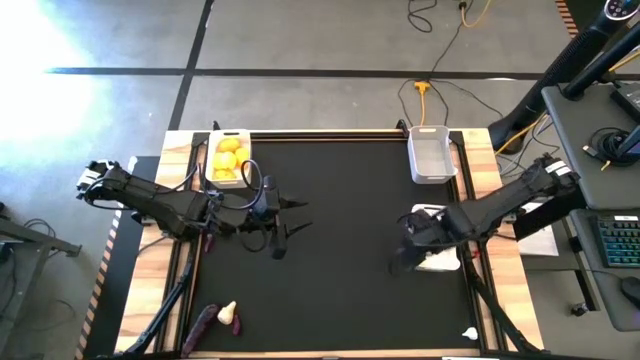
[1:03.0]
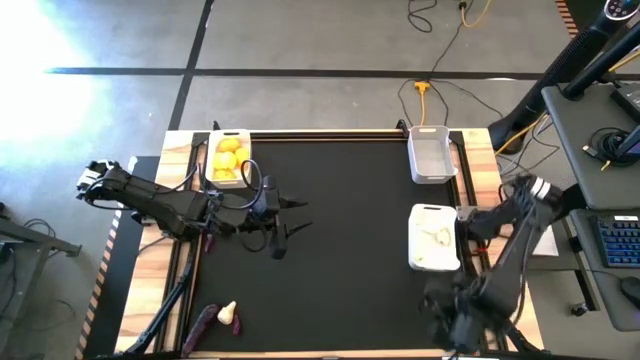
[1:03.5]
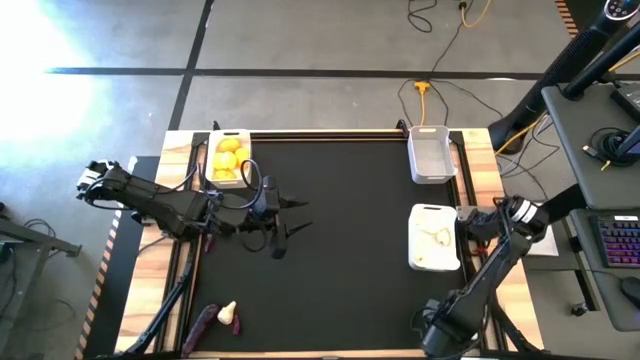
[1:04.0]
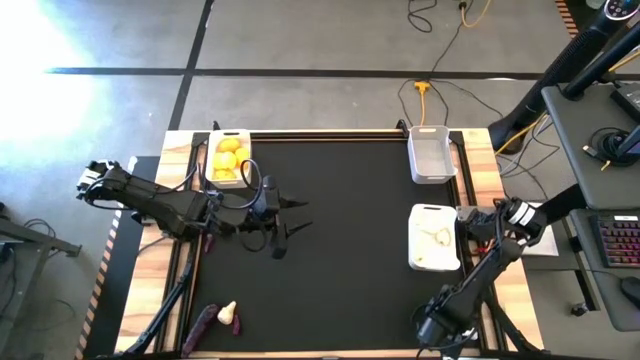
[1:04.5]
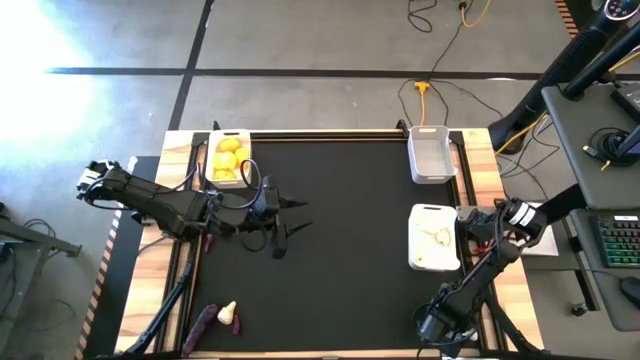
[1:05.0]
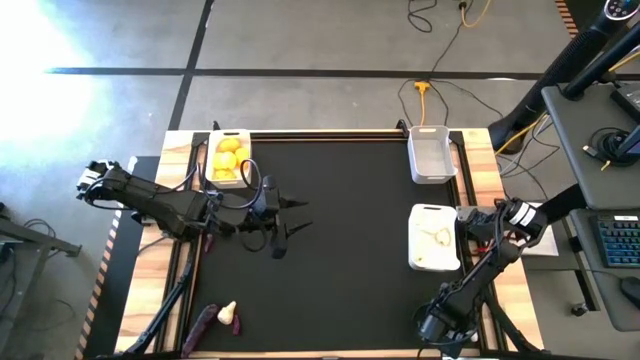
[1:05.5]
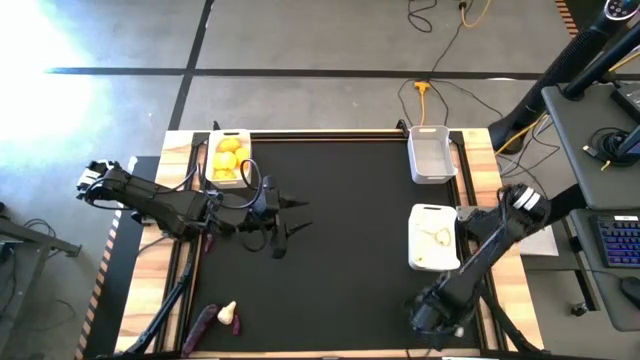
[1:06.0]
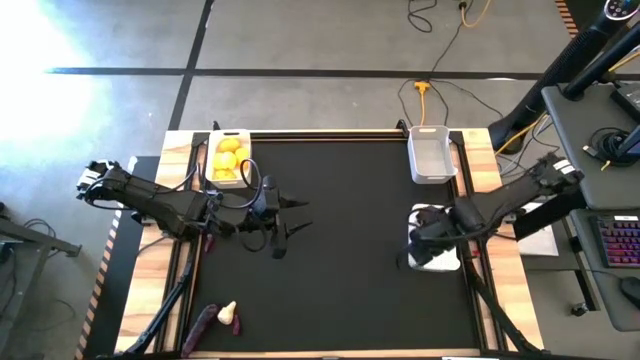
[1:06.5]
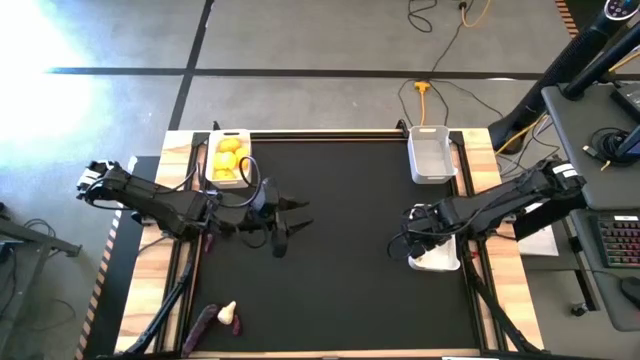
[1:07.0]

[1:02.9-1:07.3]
Task: Sort produce into baskets
Put the white garlic into the right white bin

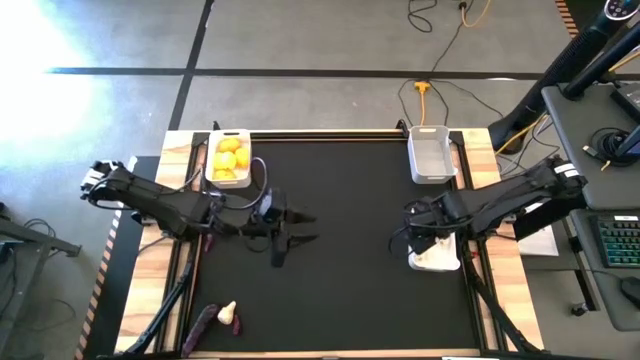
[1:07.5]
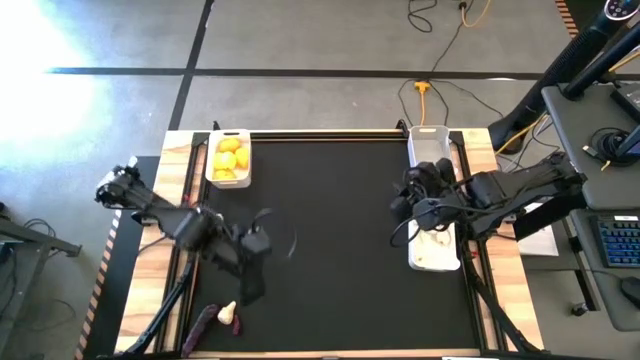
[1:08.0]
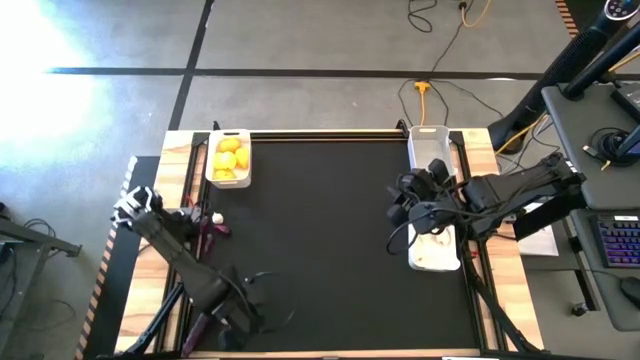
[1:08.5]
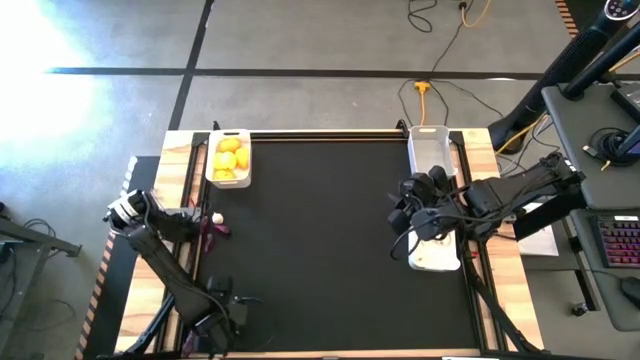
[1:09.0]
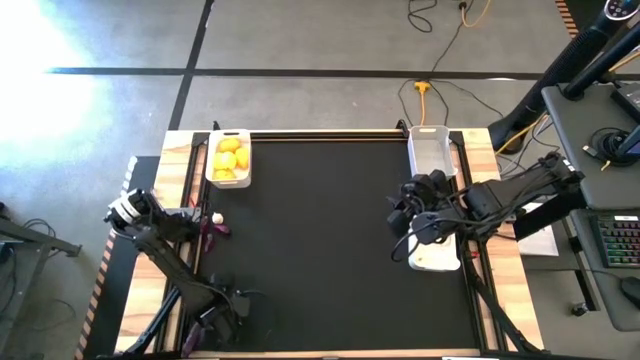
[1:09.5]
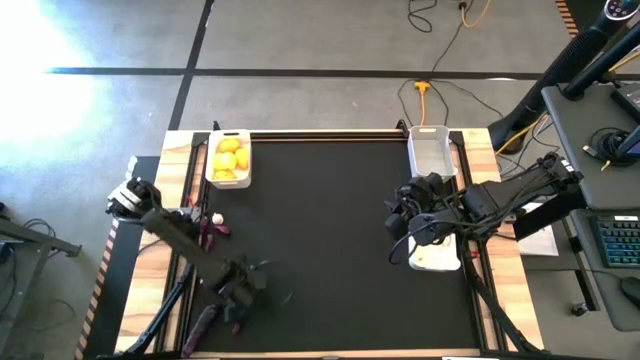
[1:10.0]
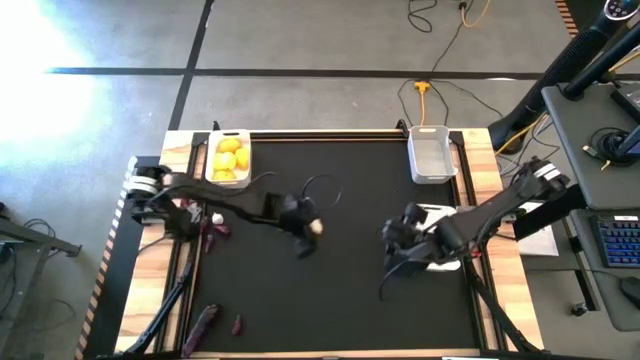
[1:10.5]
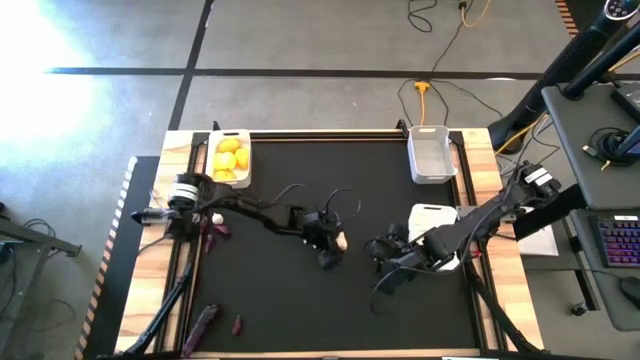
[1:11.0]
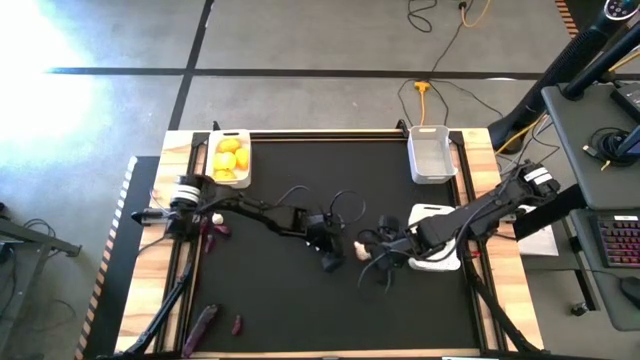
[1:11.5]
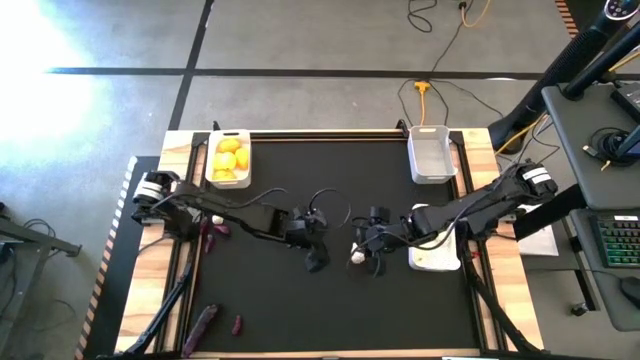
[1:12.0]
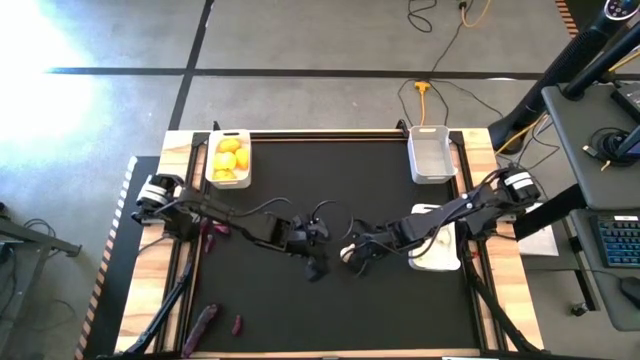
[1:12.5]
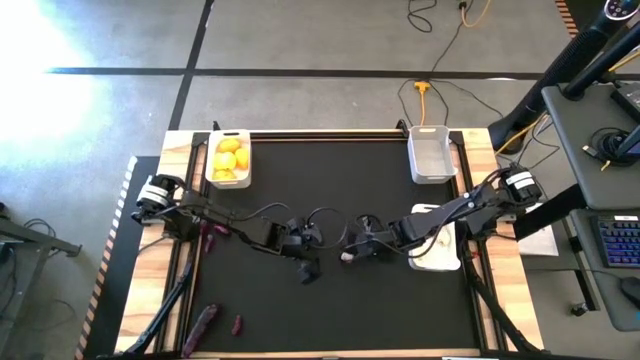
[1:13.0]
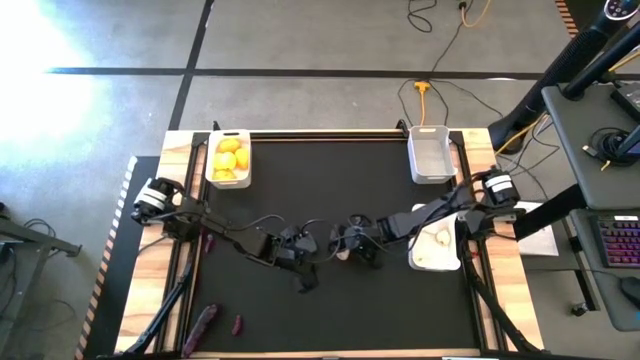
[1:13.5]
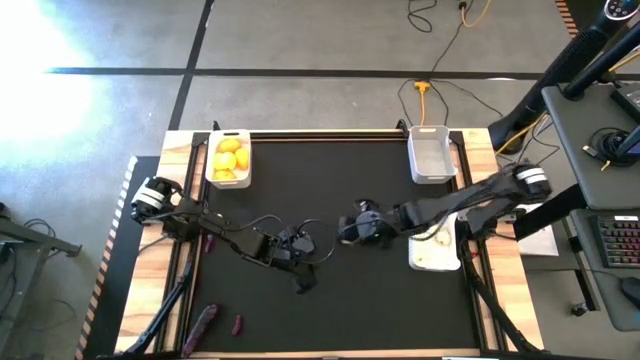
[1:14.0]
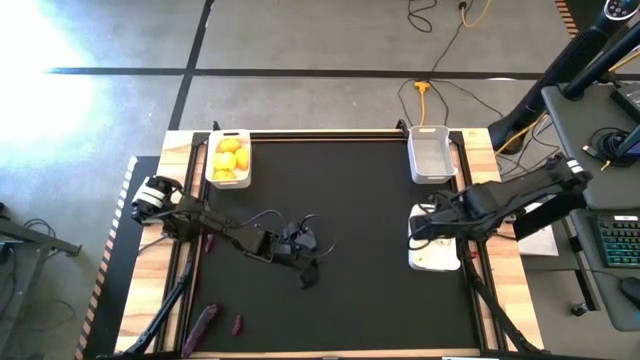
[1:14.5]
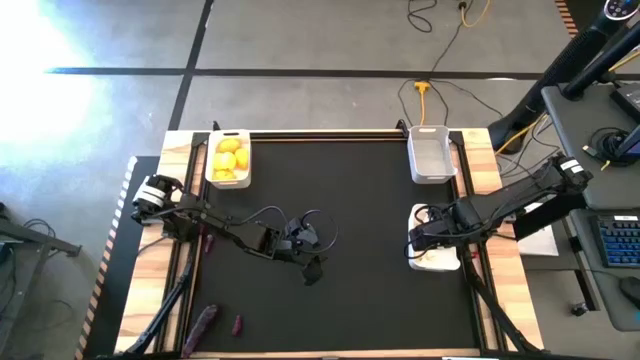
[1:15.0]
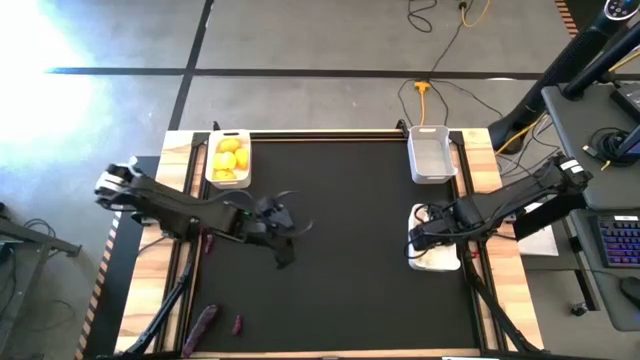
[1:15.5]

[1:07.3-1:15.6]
Put the white garlic into the right white bin

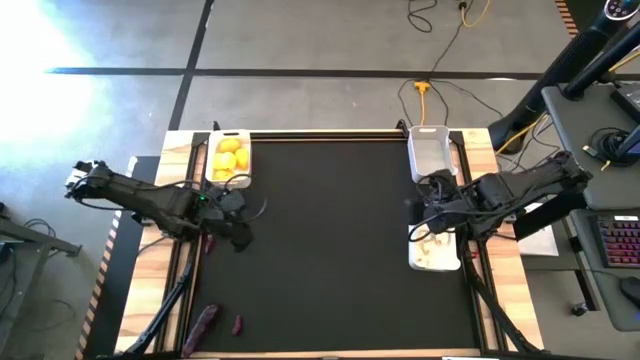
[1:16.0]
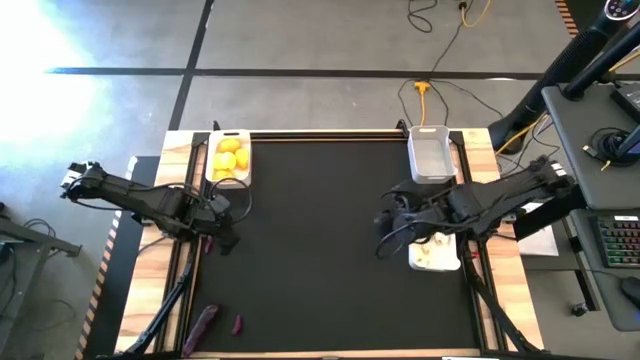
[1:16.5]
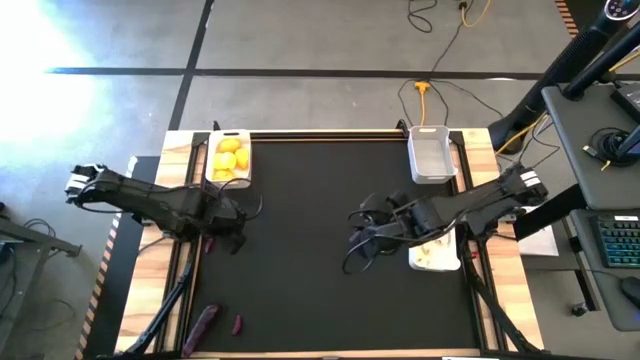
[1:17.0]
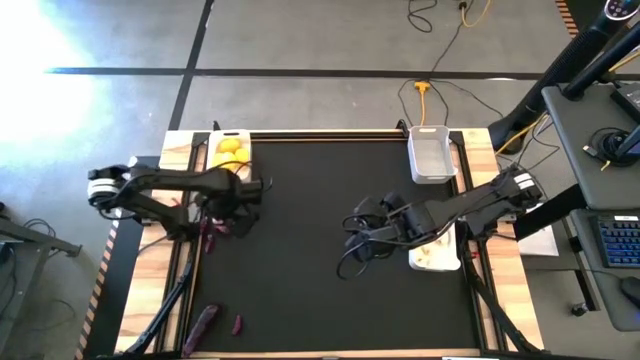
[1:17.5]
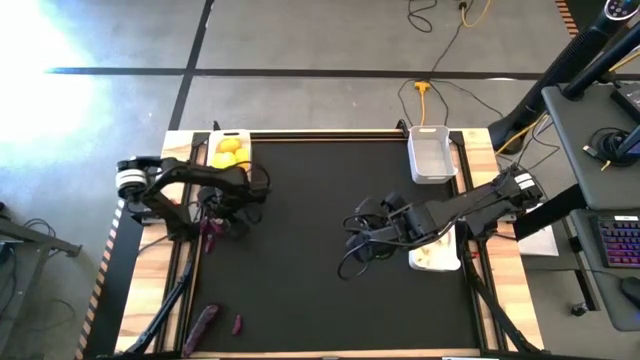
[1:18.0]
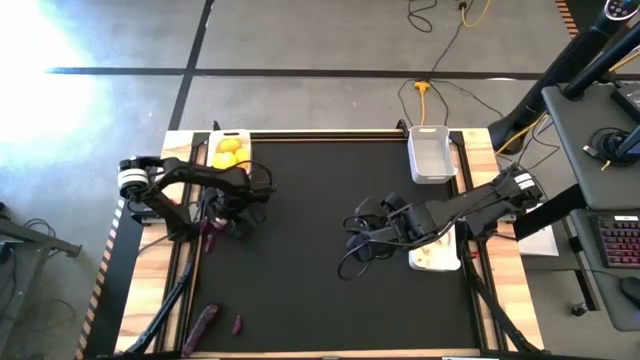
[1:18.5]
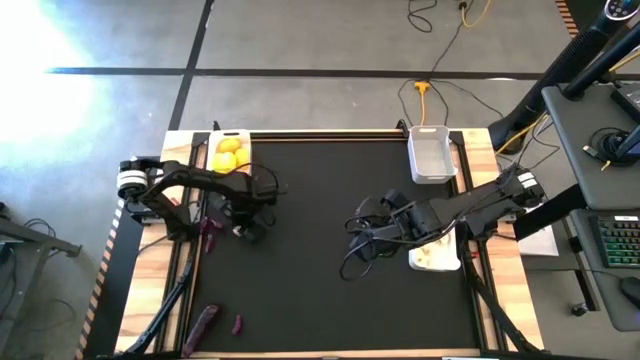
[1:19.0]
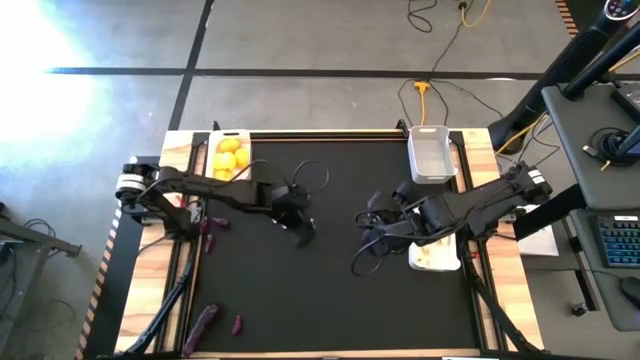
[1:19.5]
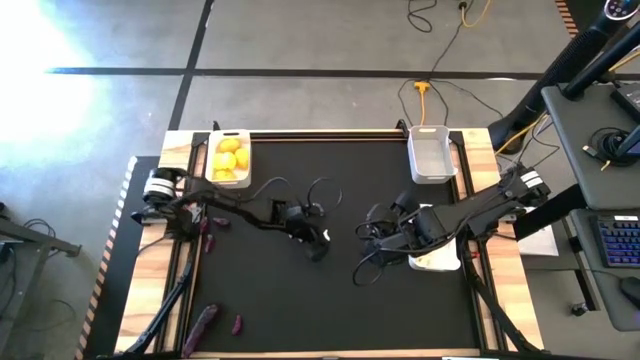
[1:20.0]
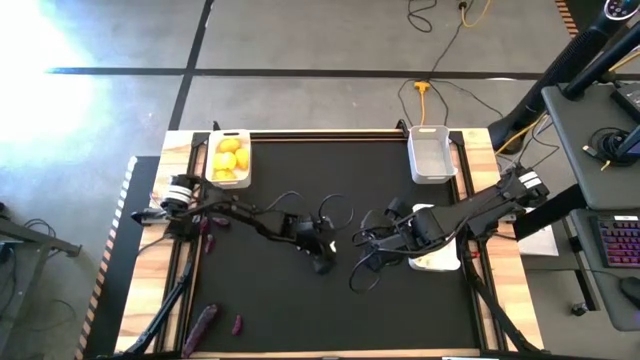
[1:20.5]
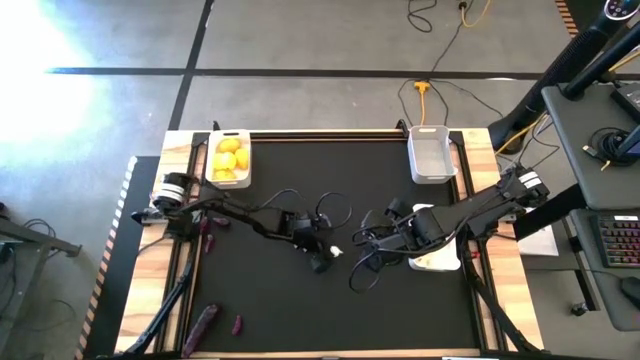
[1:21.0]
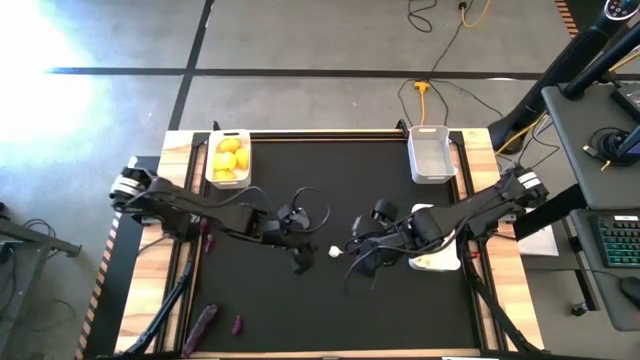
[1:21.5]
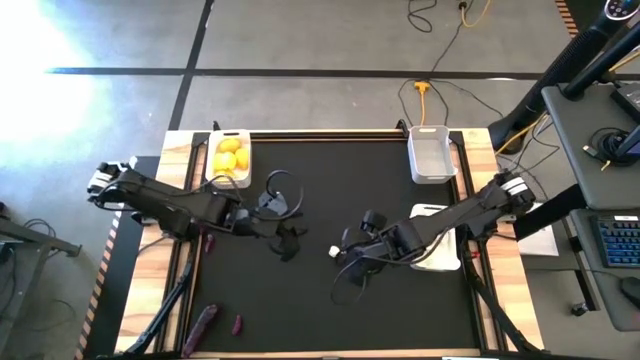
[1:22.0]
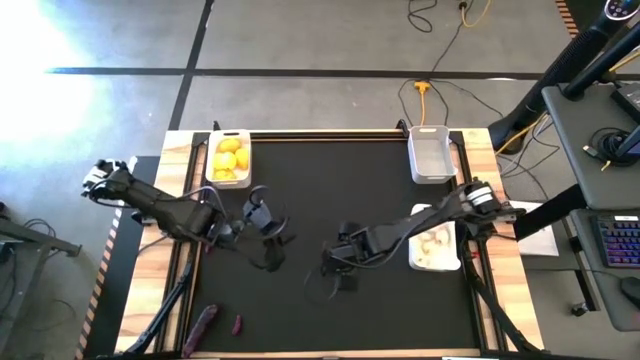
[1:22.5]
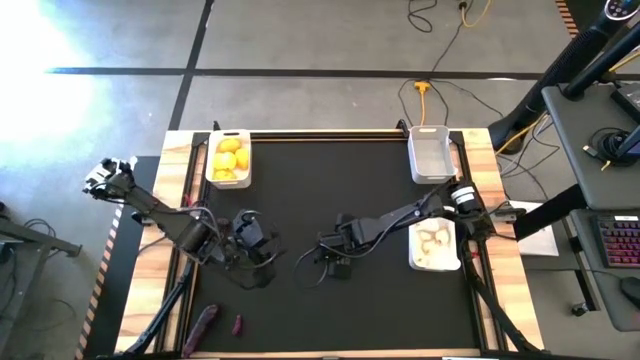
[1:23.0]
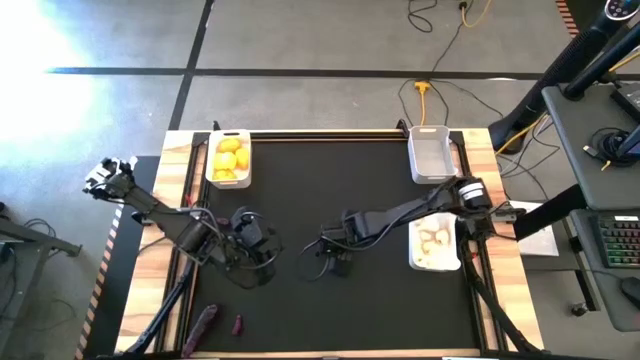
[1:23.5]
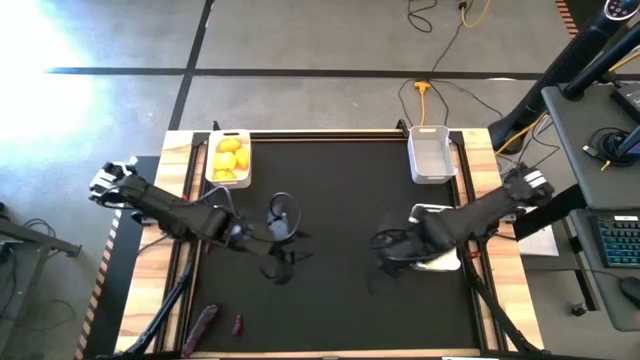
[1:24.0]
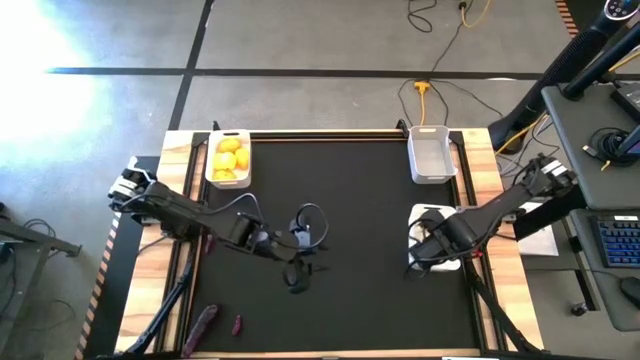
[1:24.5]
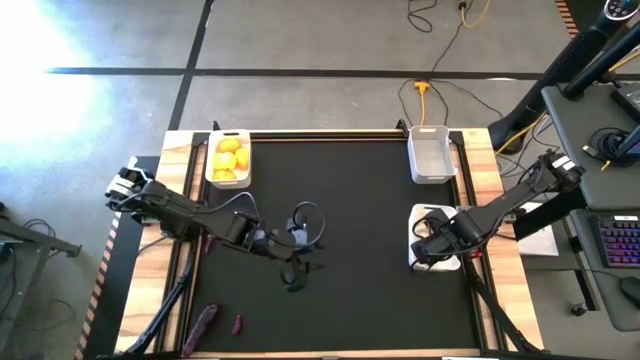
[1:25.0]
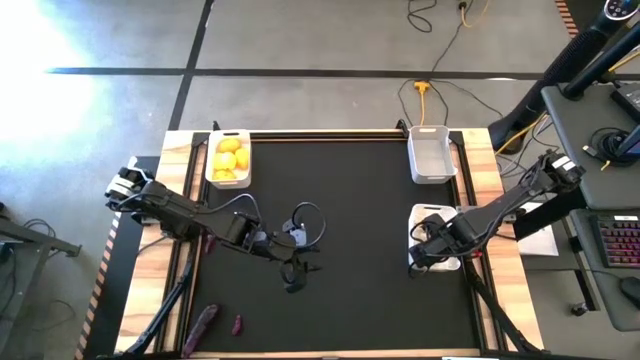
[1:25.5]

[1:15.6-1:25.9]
Put the white garlic into the right white bin
